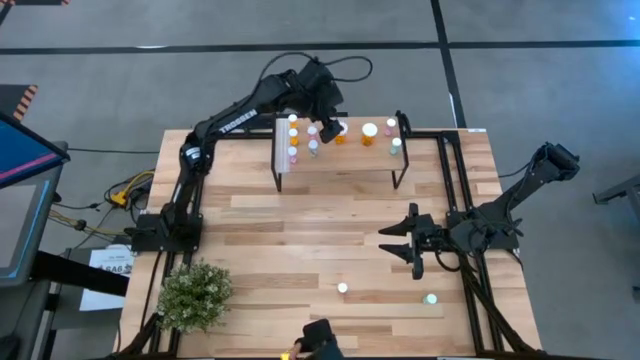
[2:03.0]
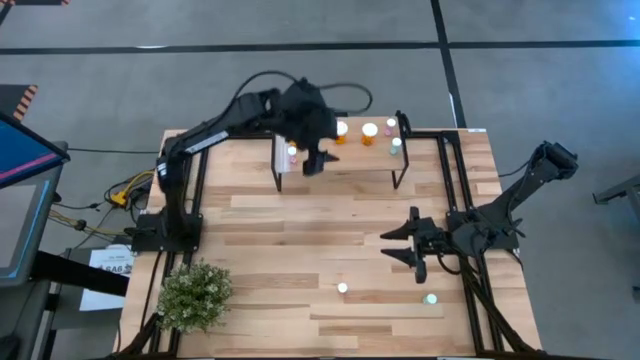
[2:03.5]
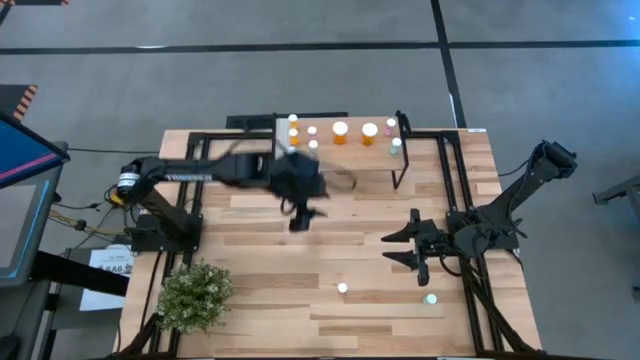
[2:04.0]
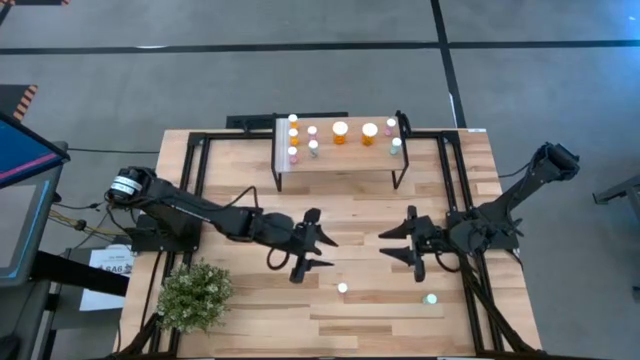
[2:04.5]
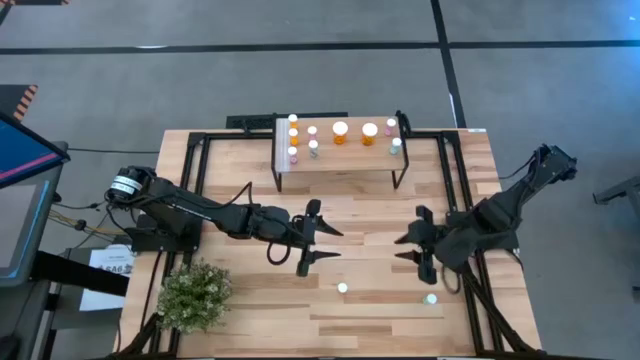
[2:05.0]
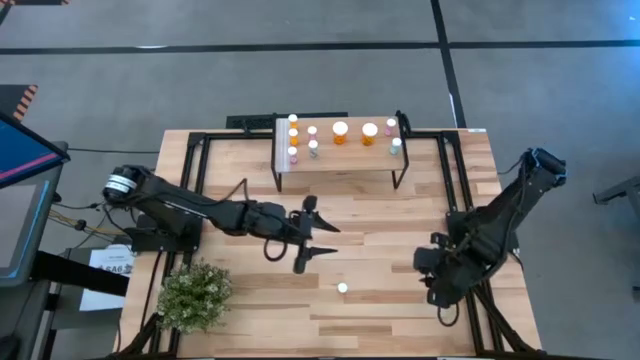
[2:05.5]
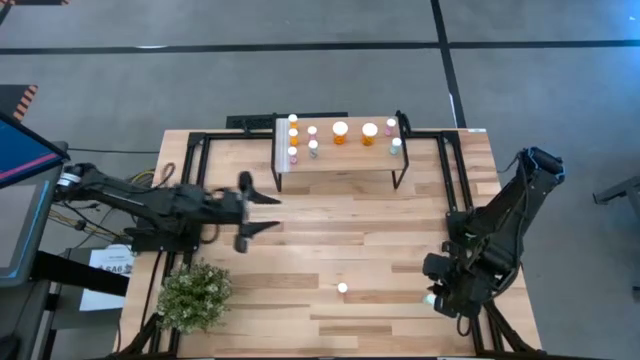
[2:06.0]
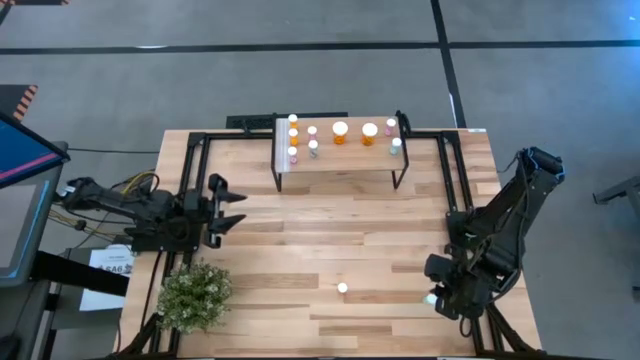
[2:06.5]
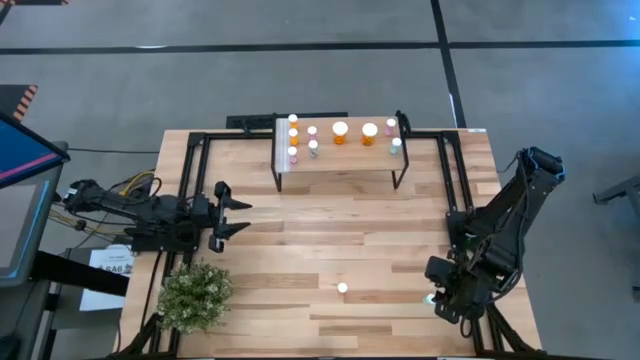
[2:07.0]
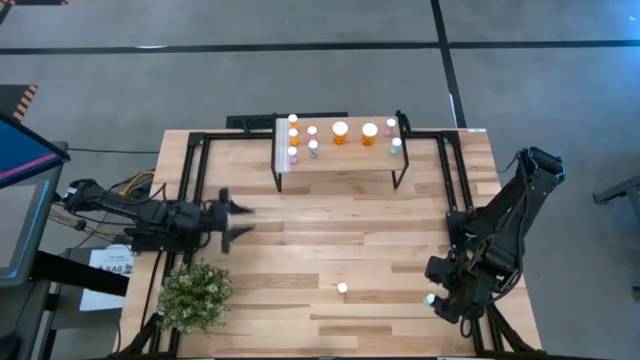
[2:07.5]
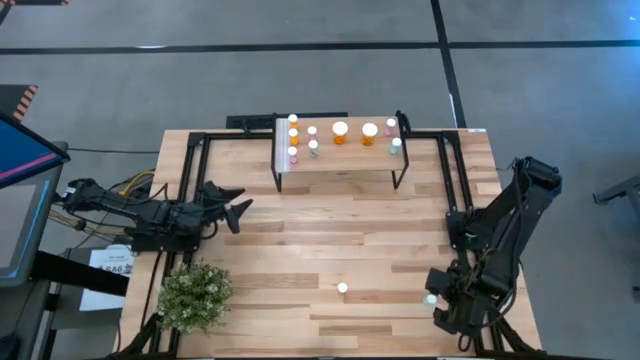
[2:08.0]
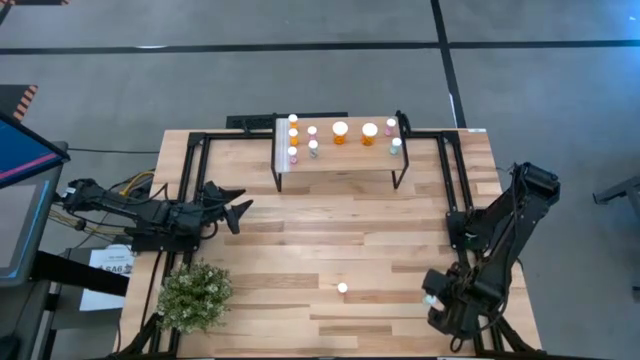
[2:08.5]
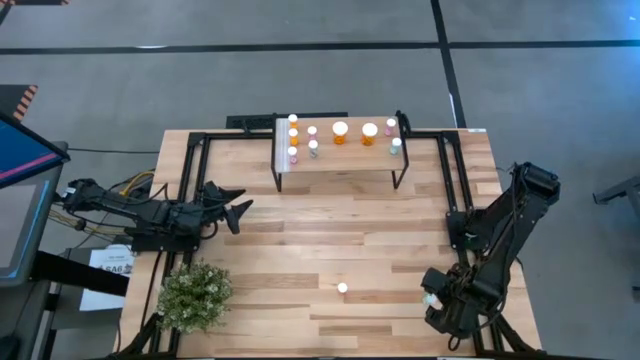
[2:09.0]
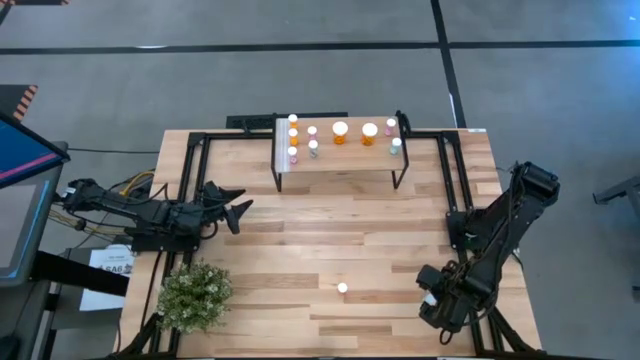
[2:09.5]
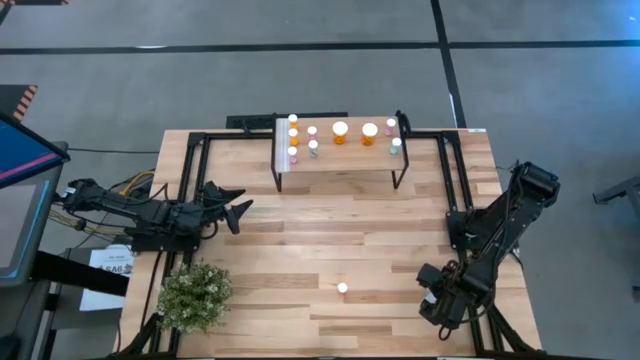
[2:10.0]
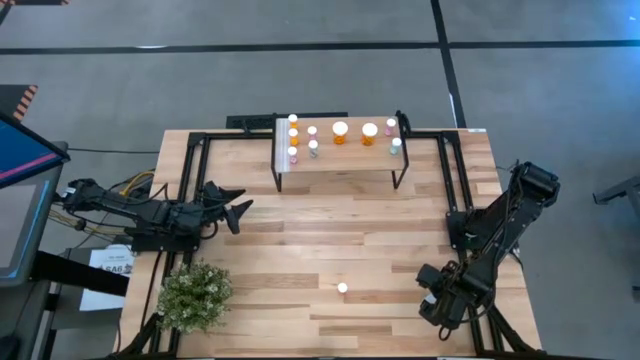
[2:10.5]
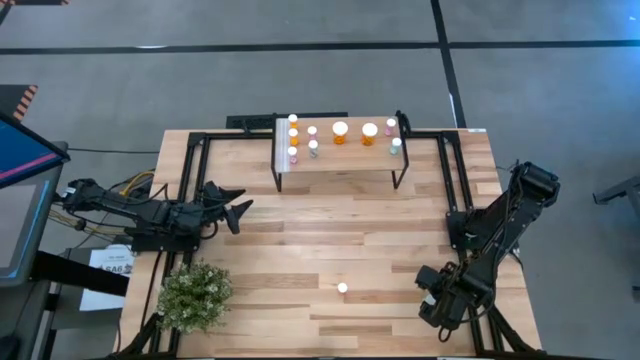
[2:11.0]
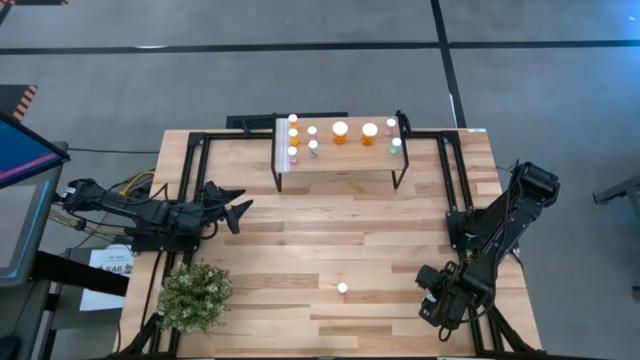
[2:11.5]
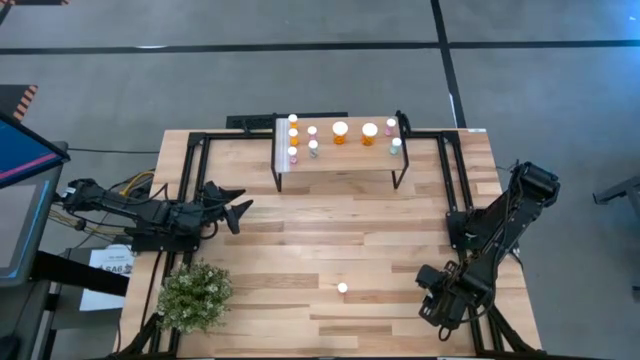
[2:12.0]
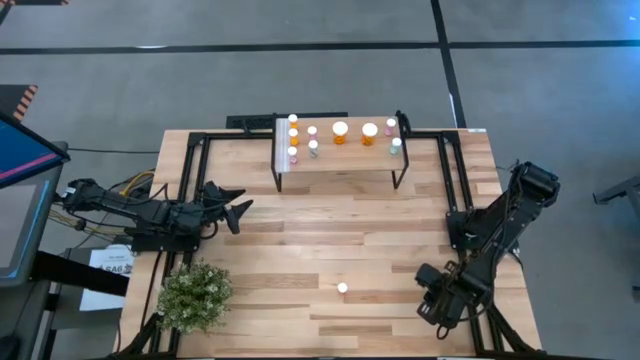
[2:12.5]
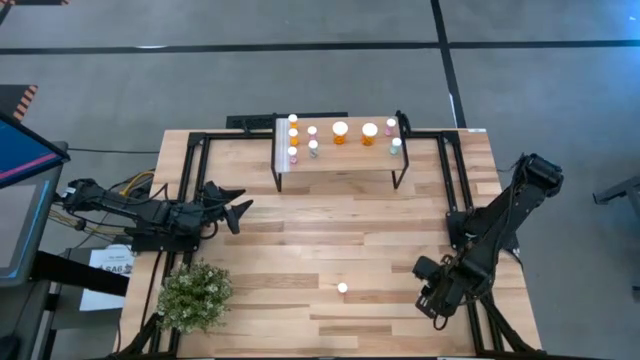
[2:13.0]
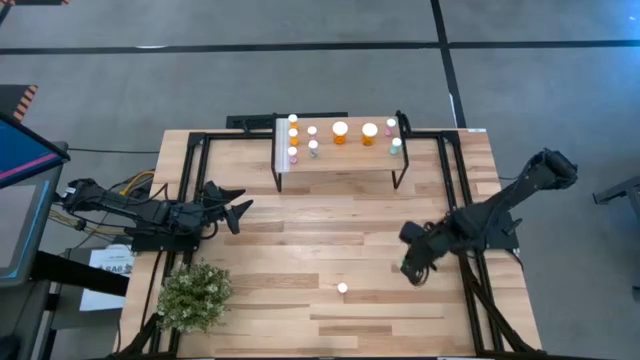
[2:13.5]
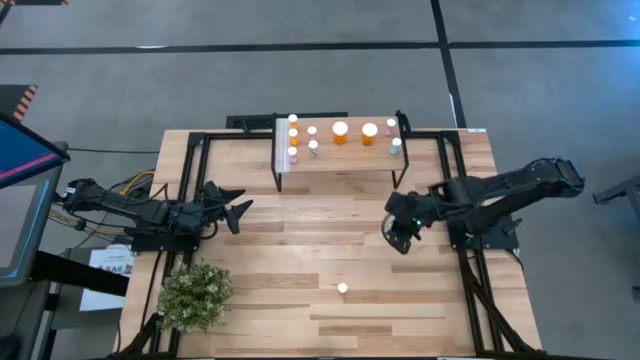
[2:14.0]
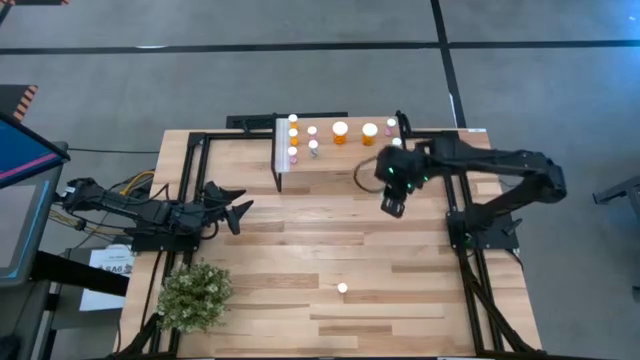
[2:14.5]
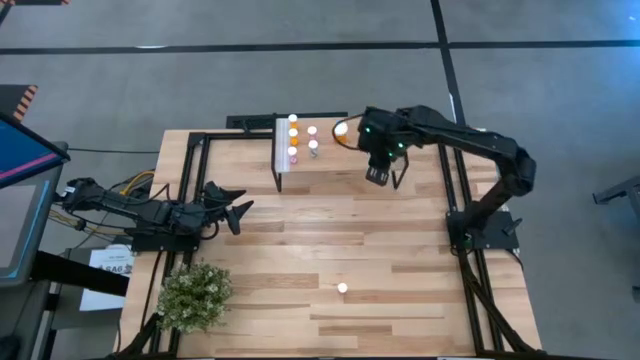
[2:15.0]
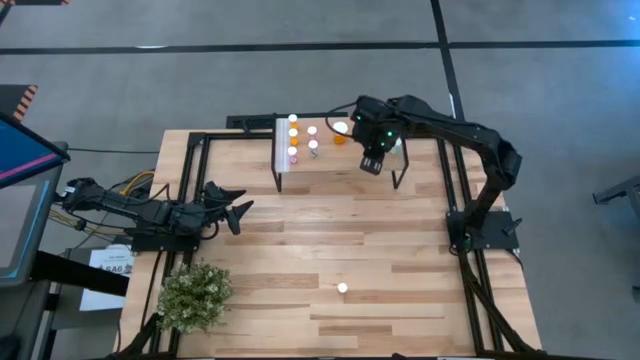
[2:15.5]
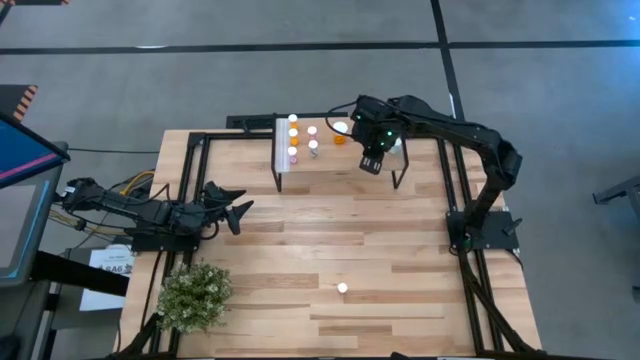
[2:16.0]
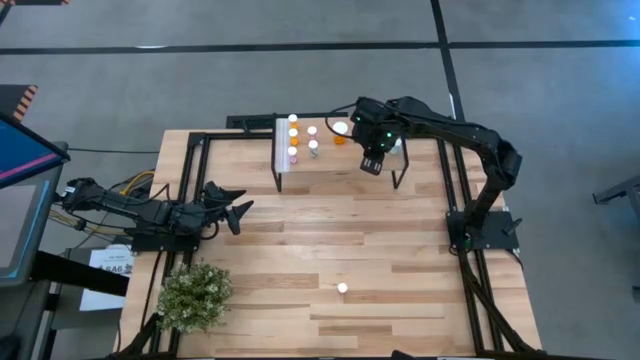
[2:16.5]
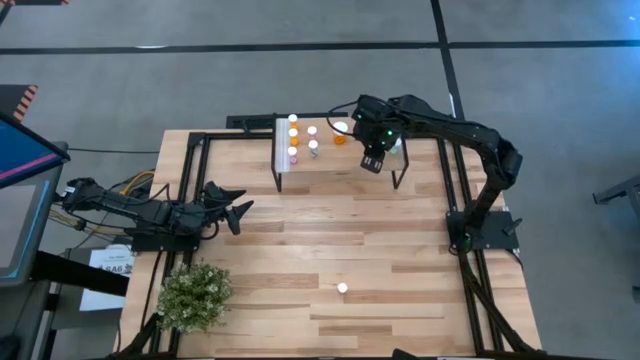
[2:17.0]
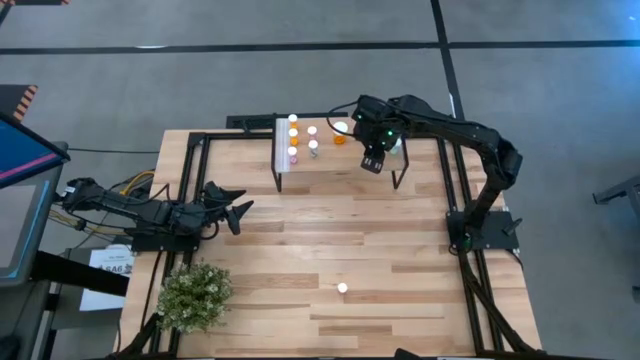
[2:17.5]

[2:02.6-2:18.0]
Task: Pick and place medicine bottles onto shelf by color
Put the small blue pill bottle on the shelf

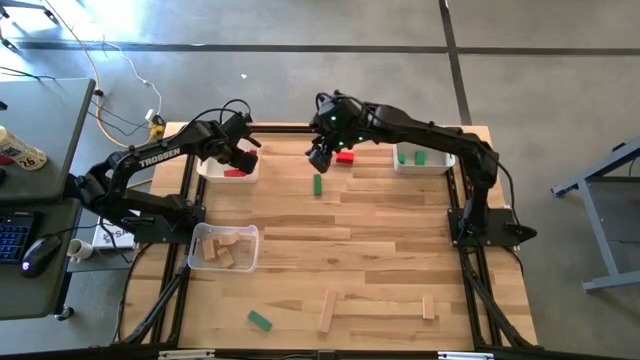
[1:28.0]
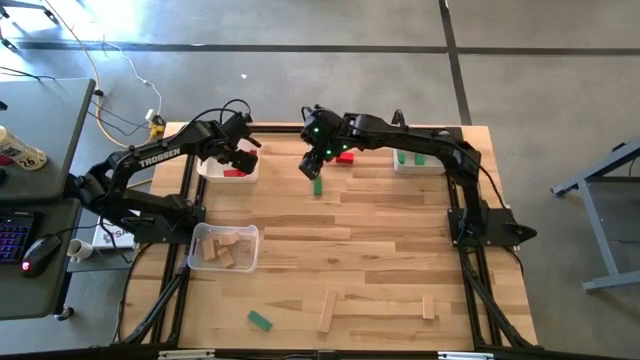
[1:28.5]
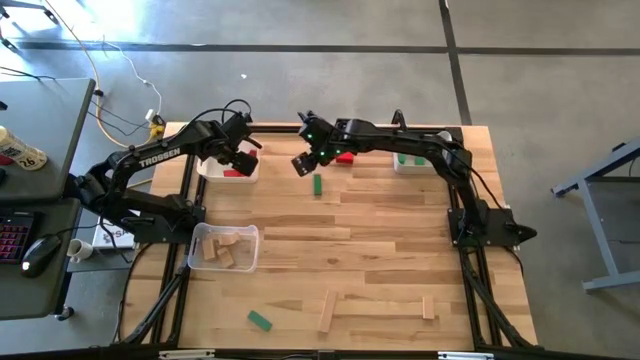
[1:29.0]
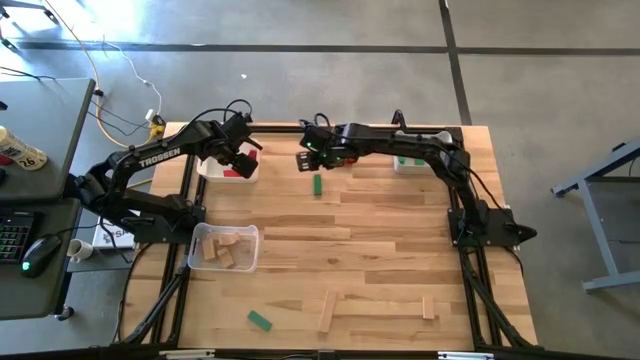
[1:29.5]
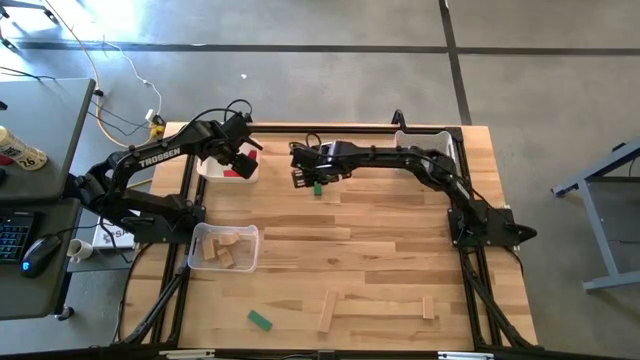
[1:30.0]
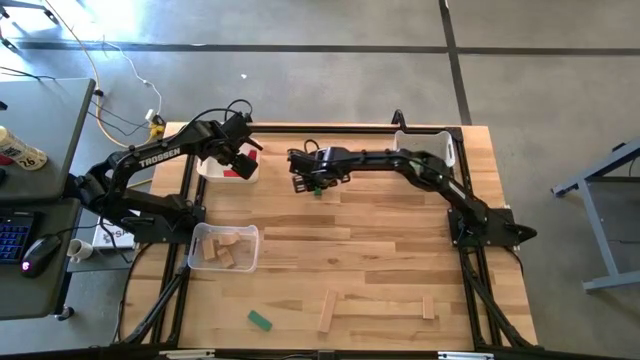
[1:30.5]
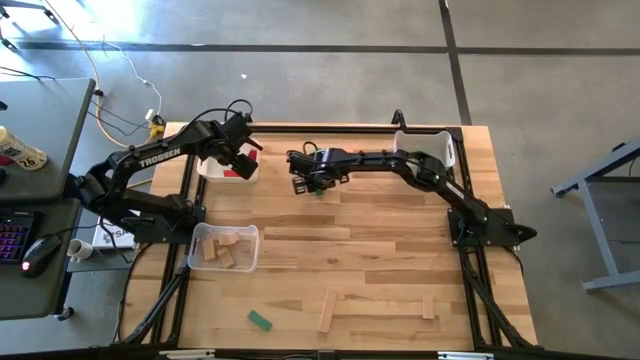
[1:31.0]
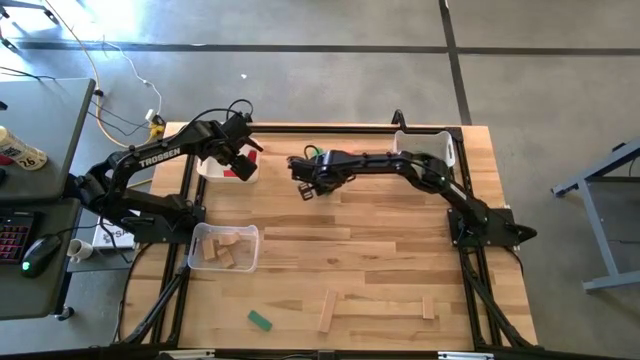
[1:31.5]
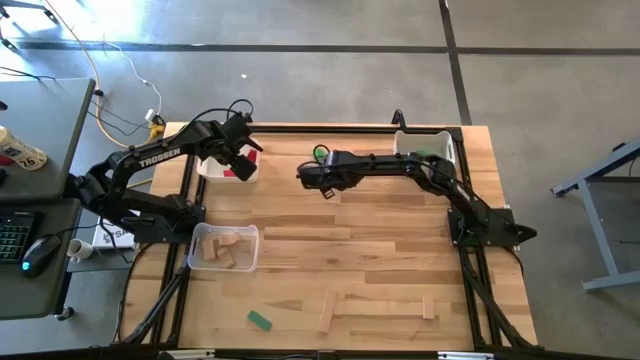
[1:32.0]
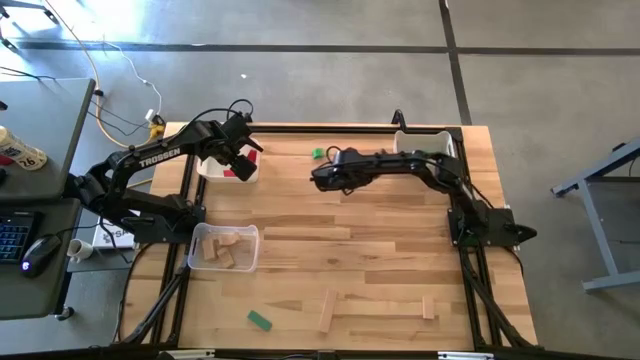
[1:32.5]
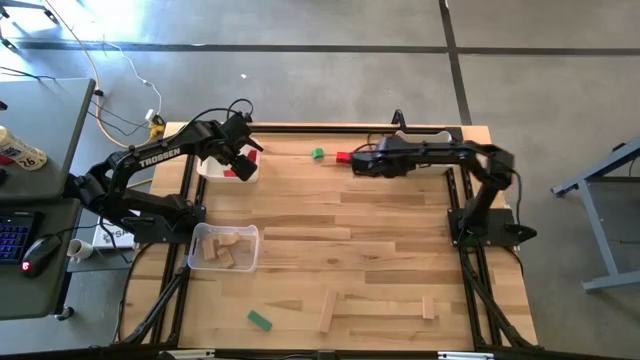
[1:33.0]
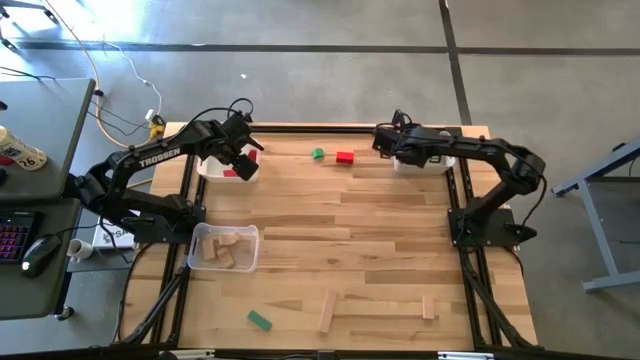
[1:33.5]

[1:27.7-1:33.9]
Task: Sort & place blocks by color
Put the green rectangle into the right white bin
